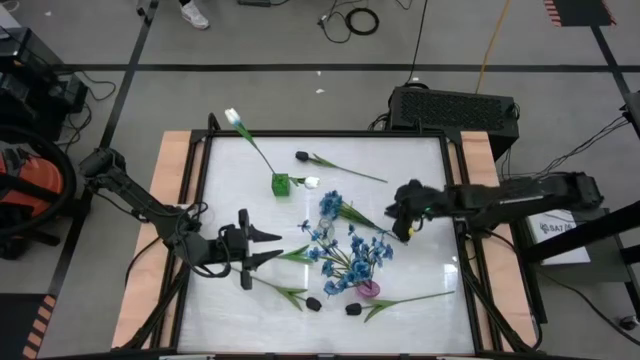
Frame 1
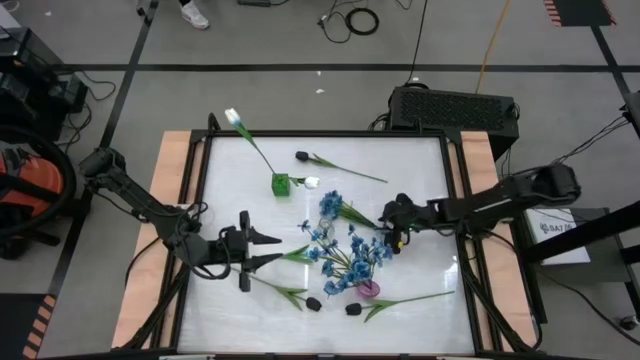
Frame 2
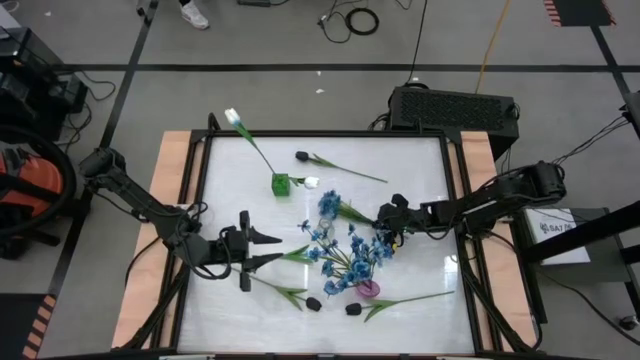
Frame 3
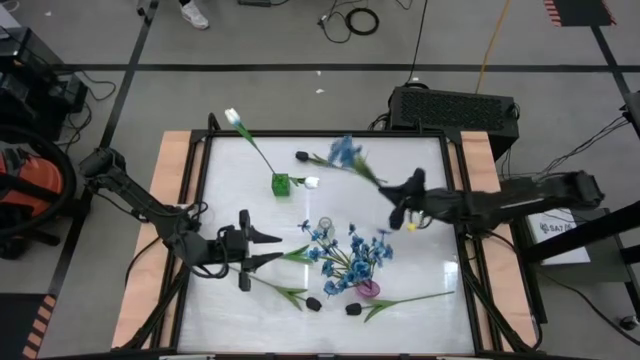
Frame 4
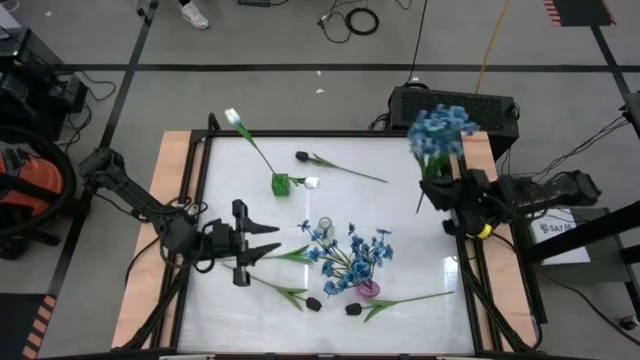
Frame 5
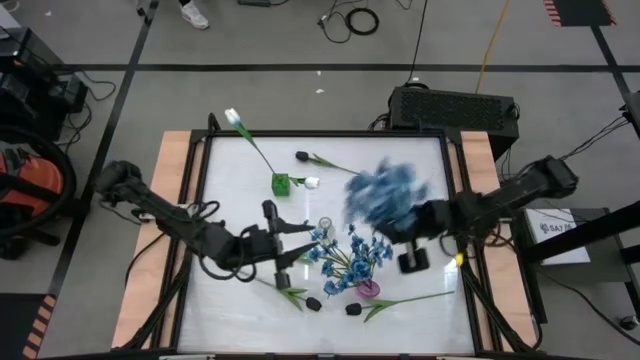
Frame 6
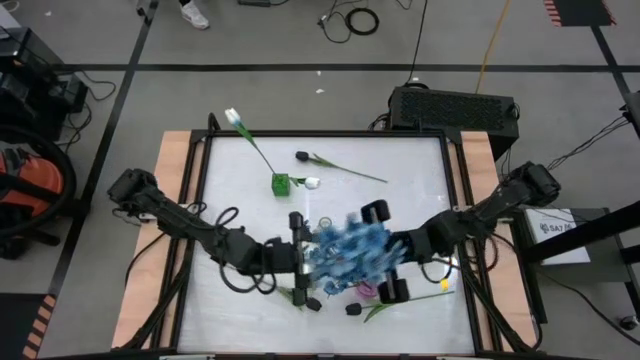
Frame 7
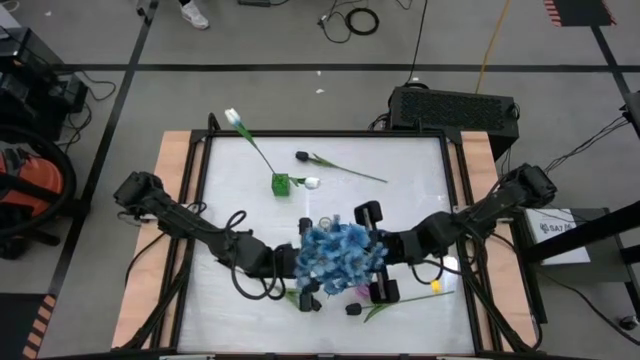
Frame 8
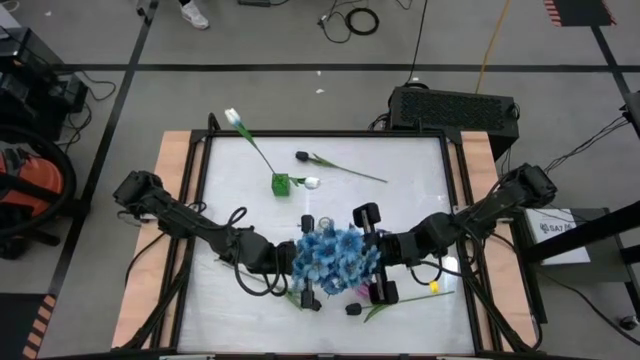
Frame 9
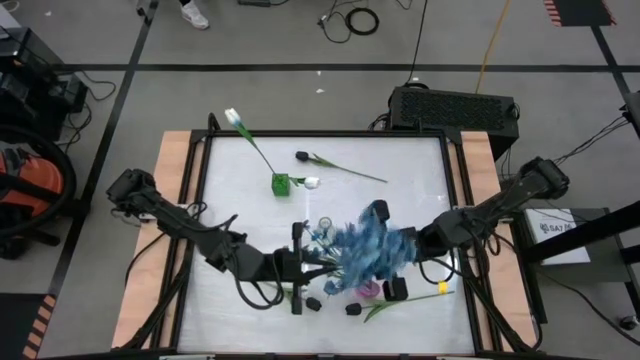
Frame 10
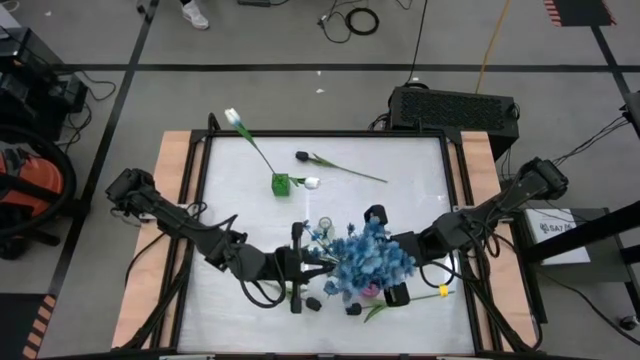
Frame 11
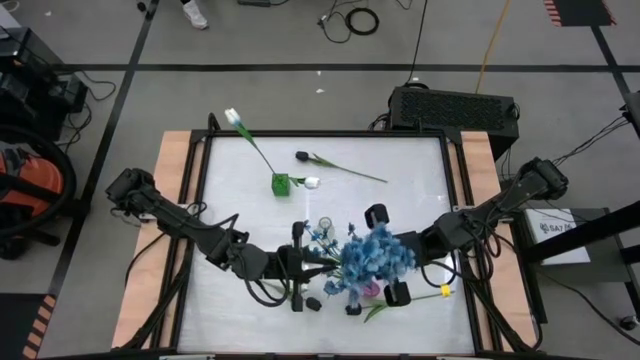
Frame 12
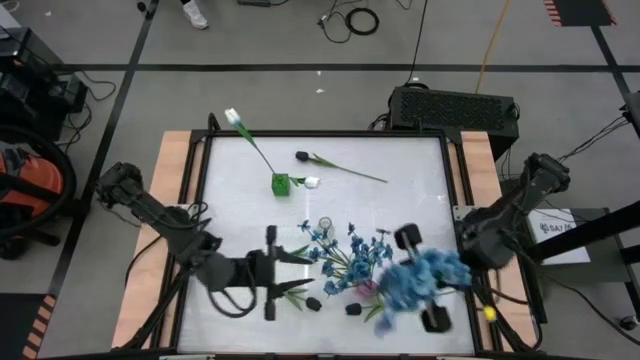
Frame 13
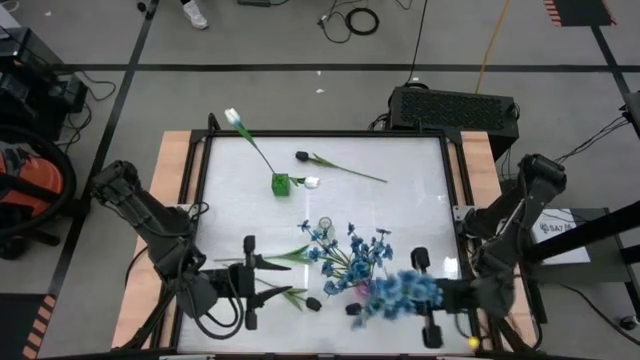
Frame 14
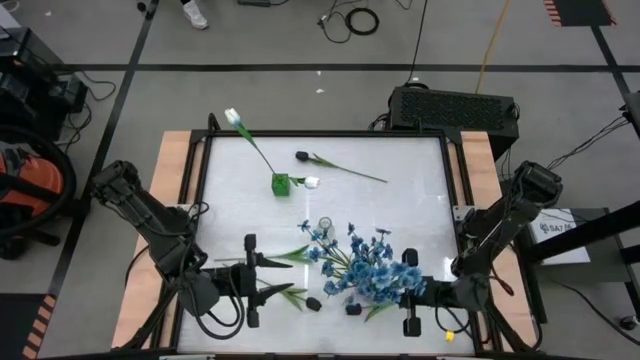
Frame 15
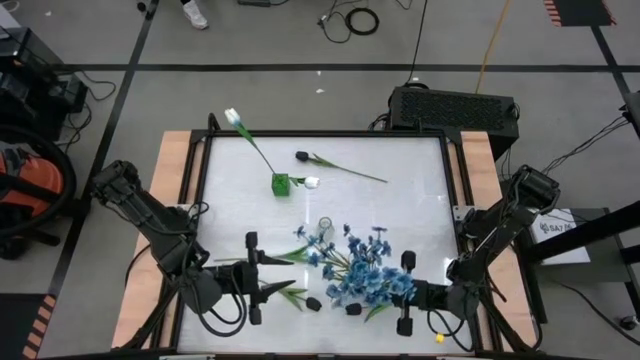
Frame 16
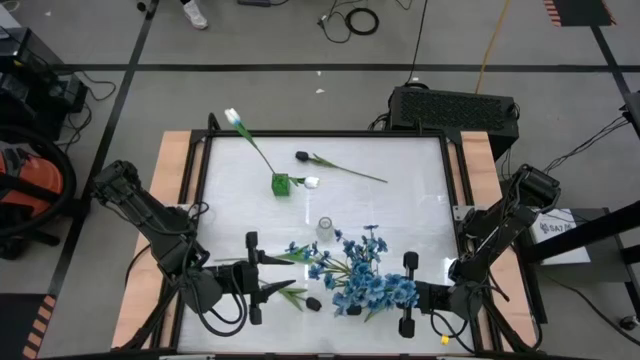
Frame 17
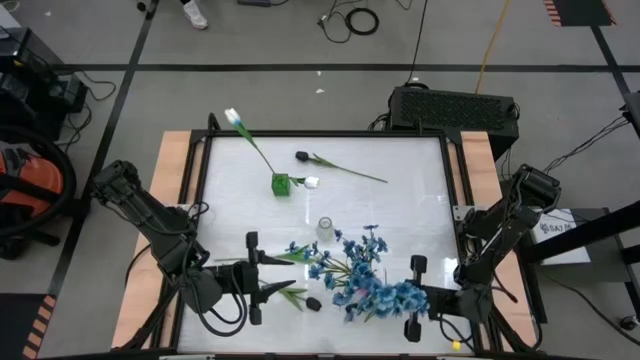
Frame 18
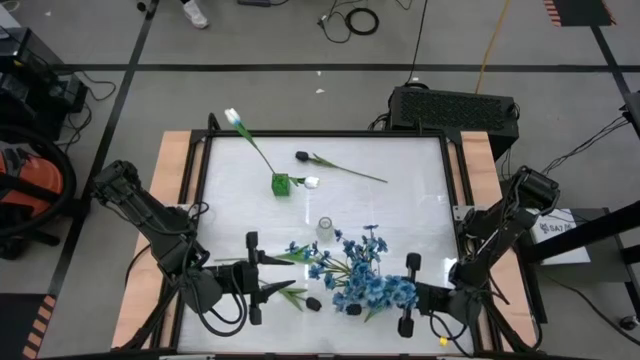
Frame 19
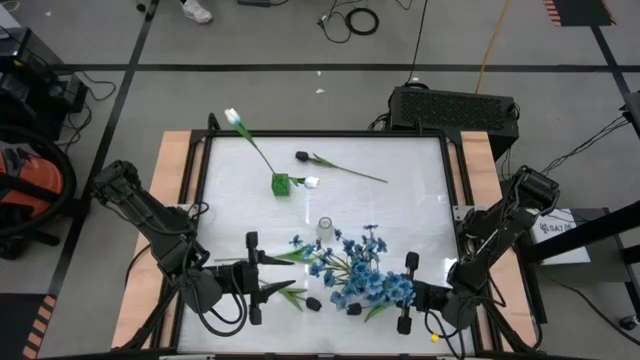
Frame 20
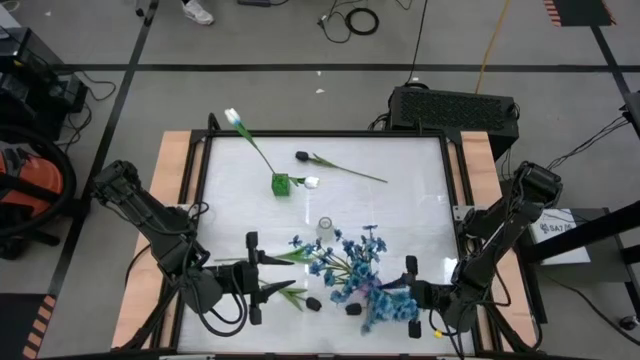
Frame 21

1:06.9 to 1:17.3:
Task: Sort flowers into vase by color
Put the blue flowers into the purple vase

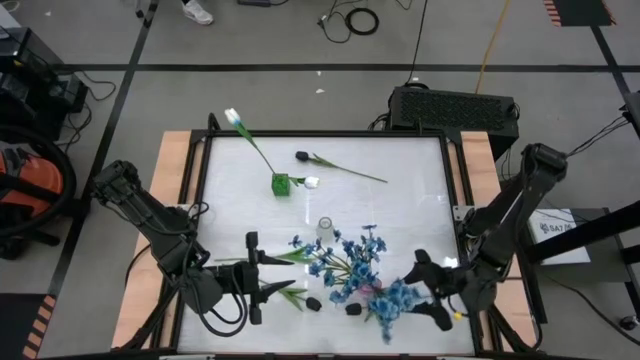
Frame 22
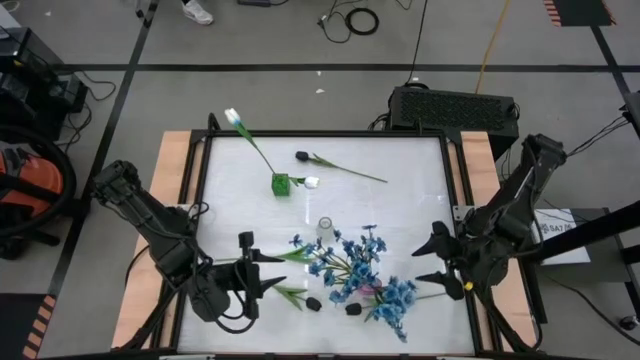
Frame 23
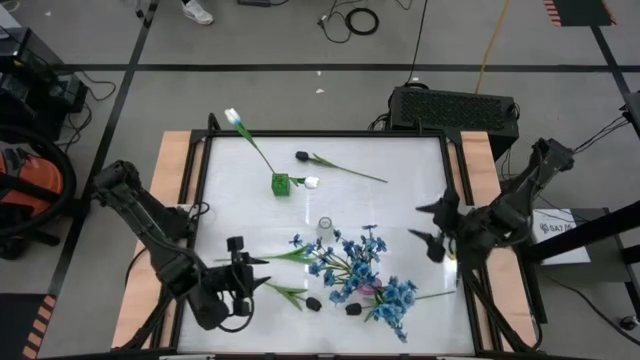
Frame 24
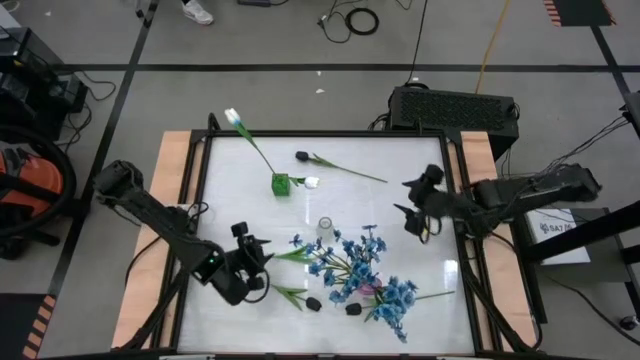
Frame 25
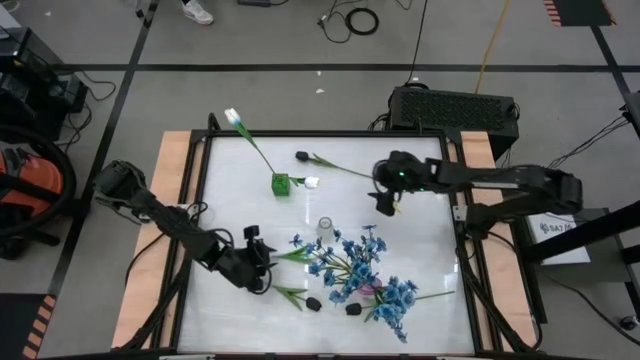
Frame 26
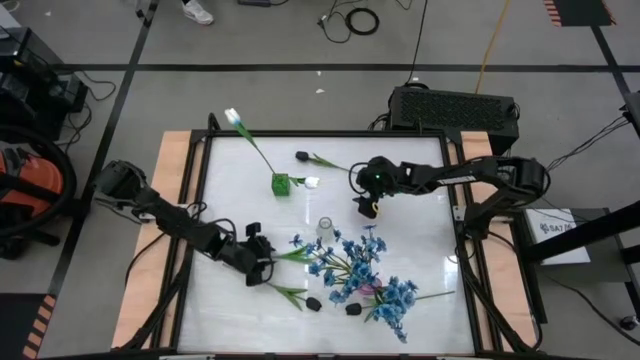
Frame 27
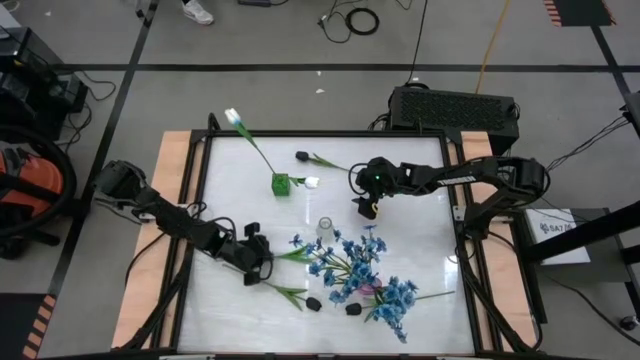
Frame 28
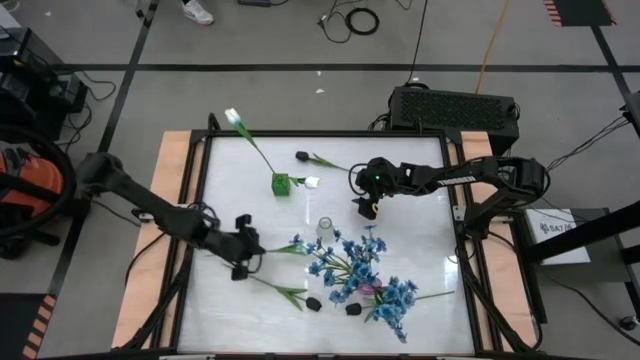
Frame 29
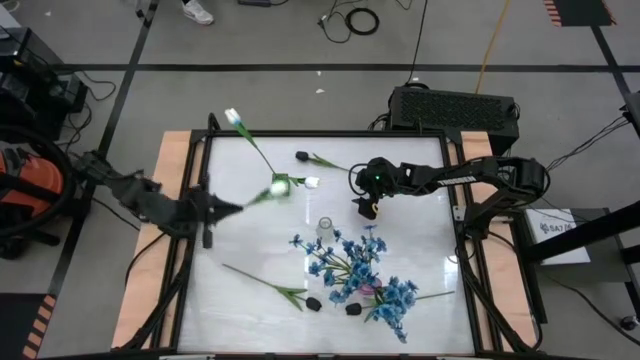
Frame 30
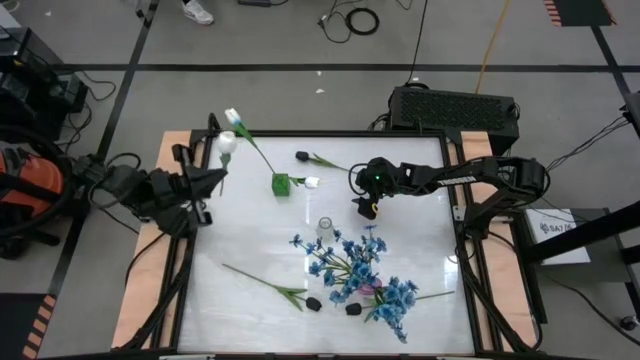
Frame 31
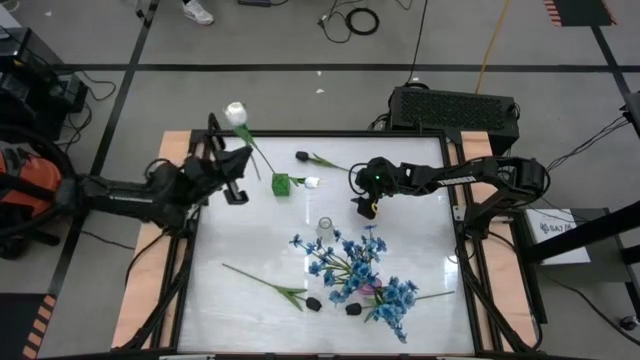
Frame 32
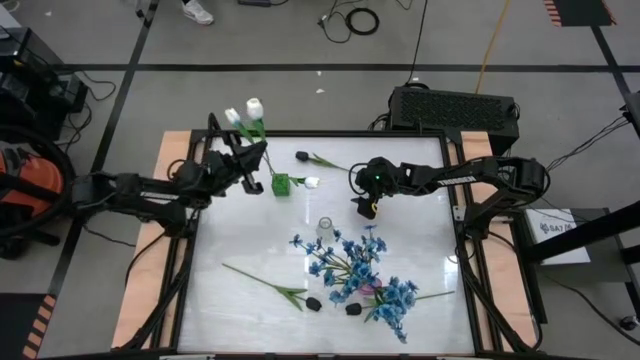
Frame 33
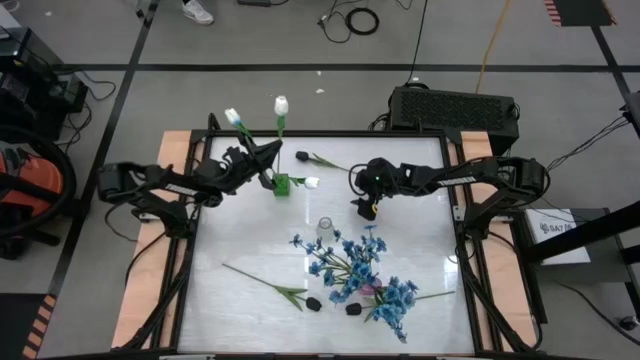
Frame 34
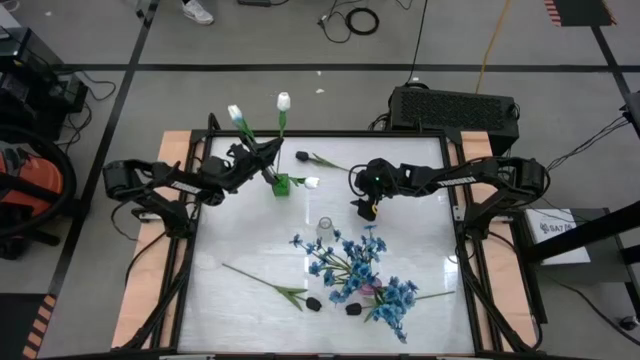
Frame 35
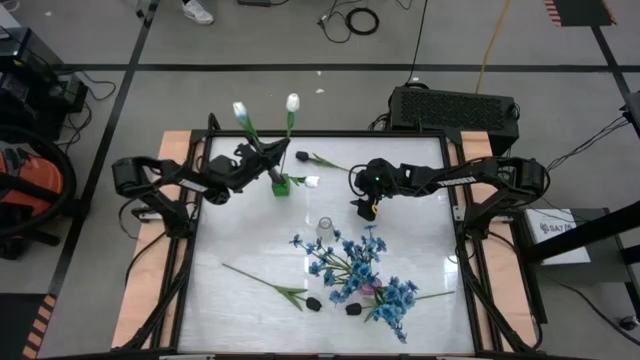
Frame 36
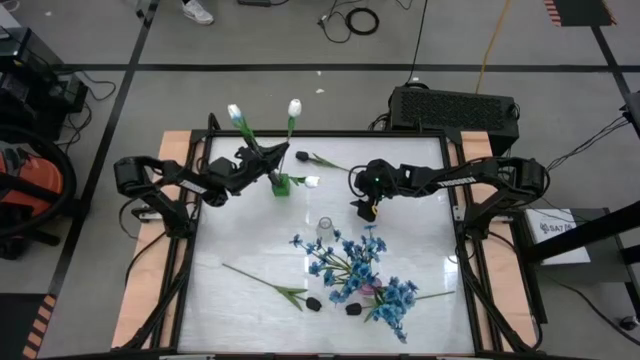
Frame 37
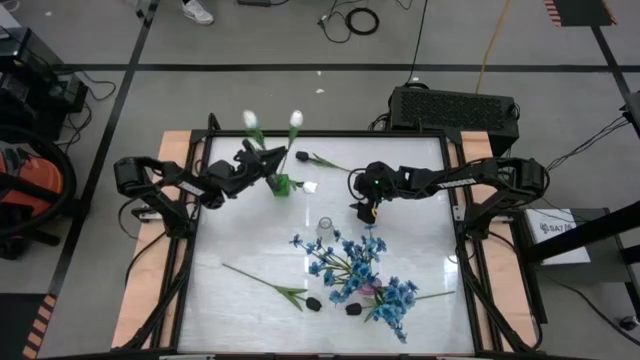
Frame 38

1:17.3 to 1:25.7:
Put the white flower into the green vase

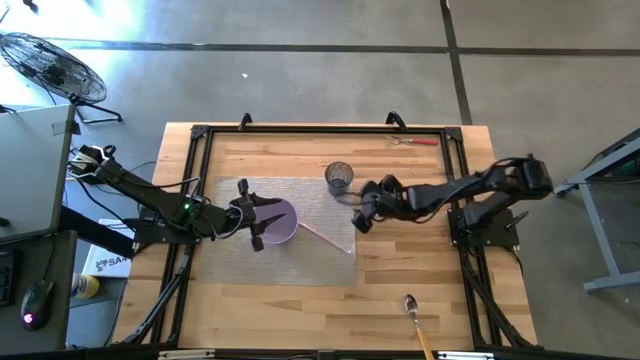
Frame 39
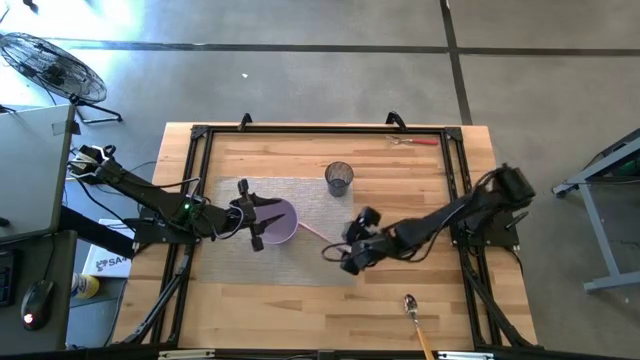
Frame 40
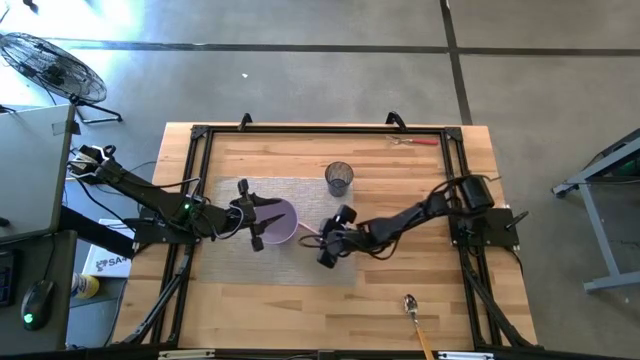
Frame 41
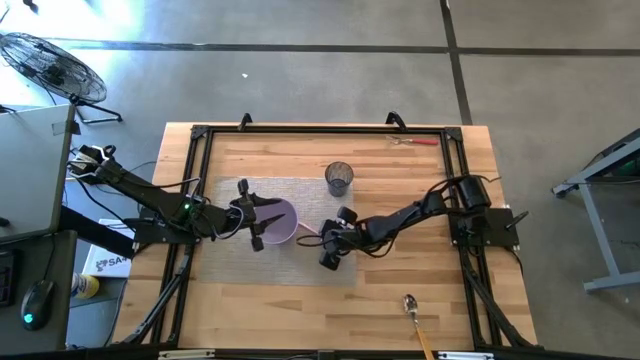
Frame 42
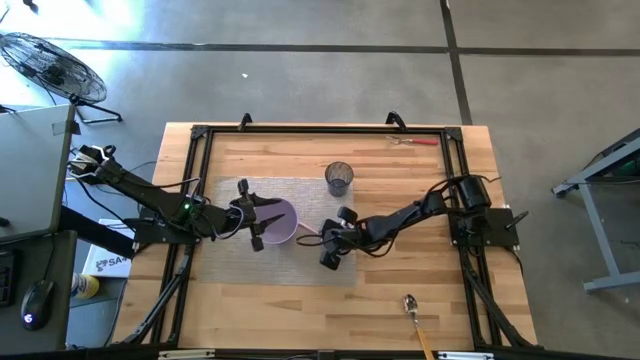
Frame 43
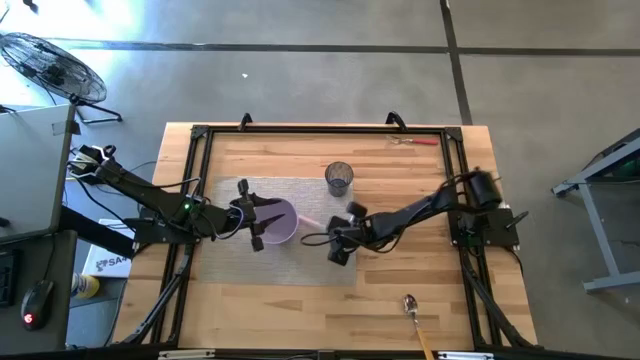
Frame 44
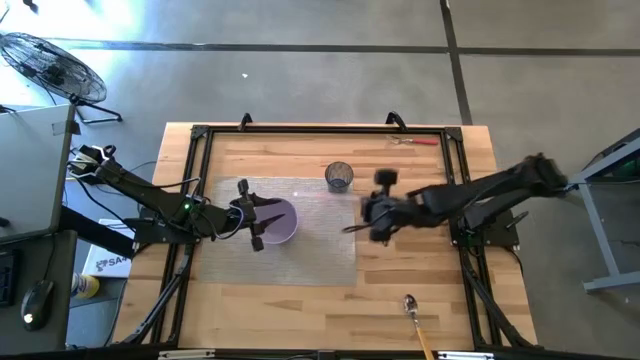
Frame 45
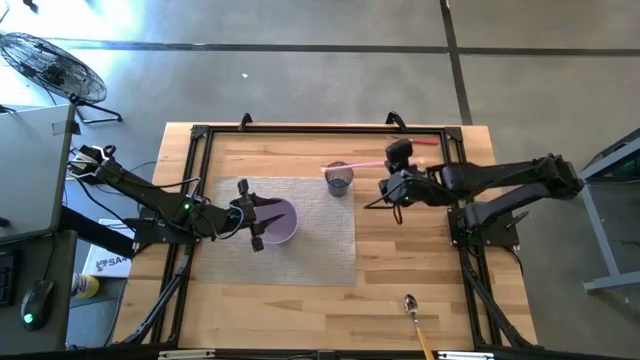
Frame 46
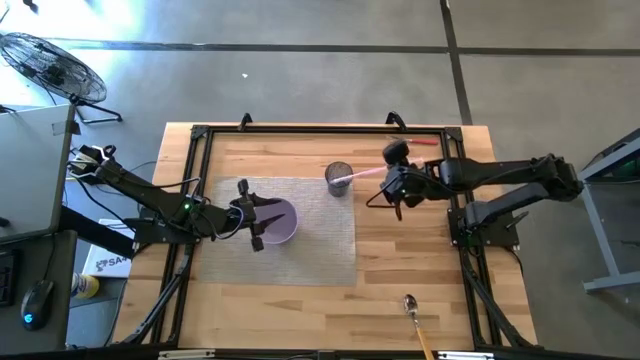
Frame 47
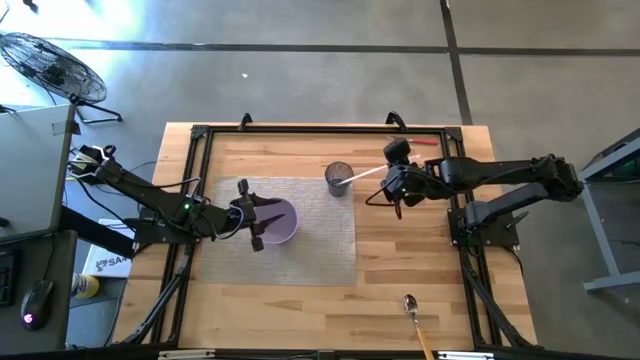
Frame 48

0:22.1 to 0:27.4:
Task: Pick & Place Utensil
Put the pink straw into the blue glass on the gray mat
